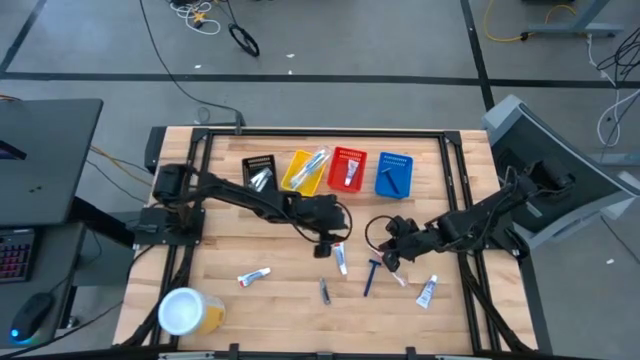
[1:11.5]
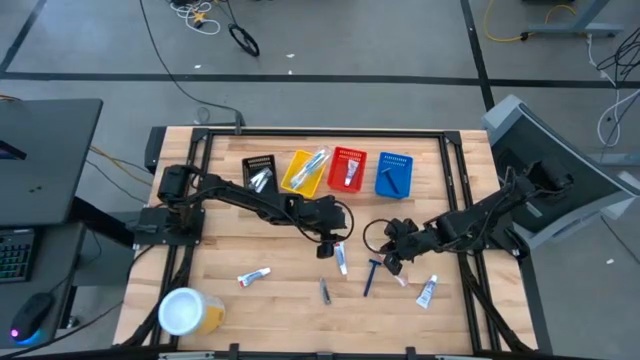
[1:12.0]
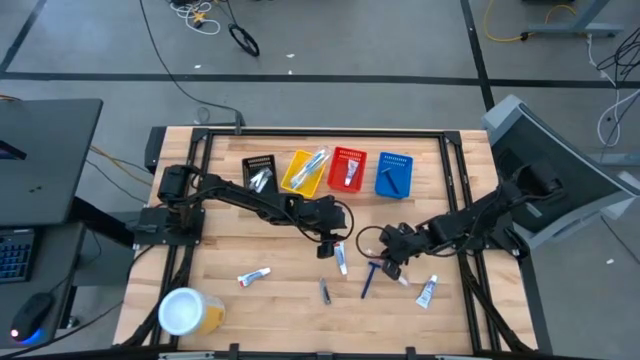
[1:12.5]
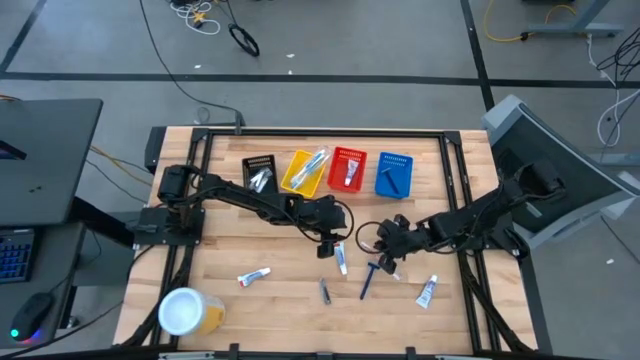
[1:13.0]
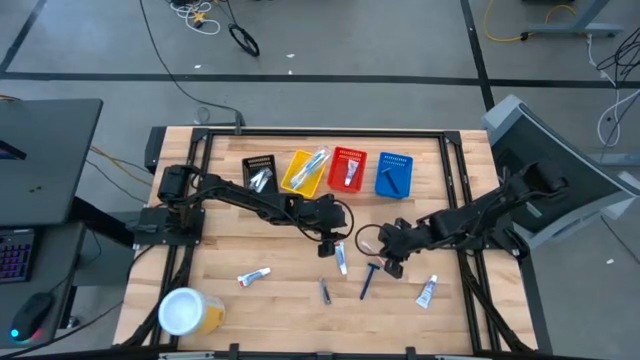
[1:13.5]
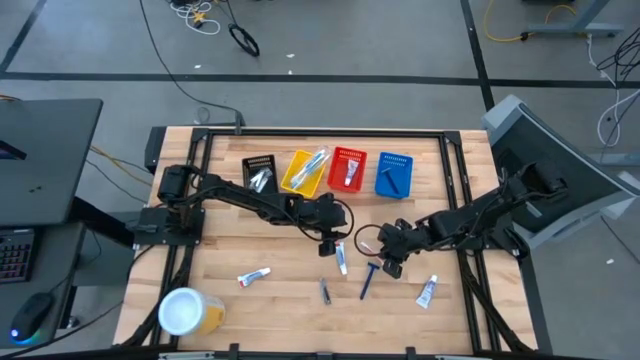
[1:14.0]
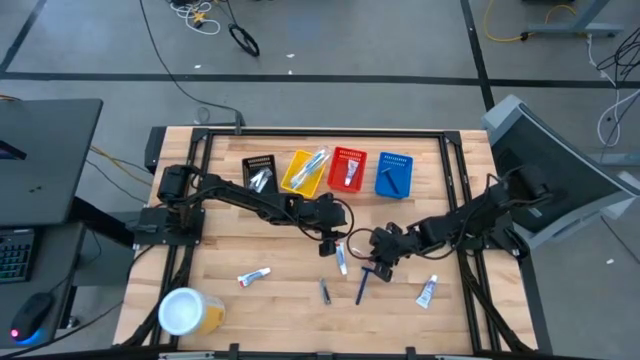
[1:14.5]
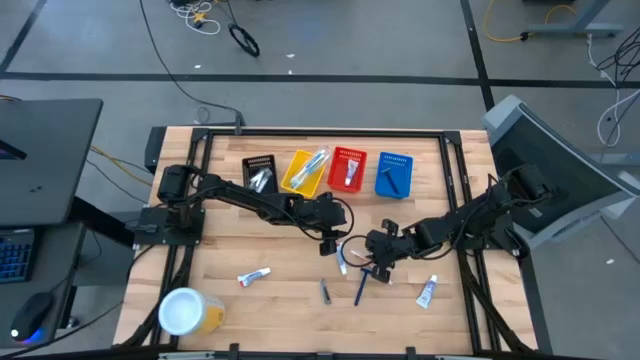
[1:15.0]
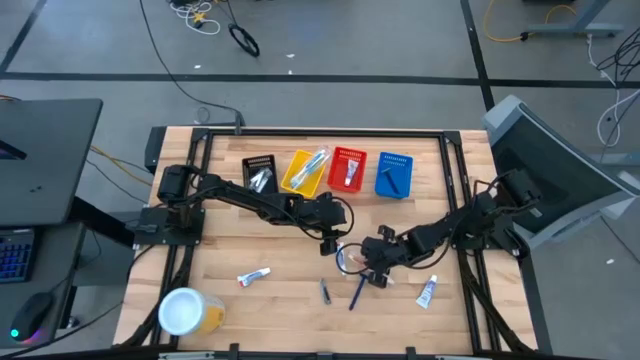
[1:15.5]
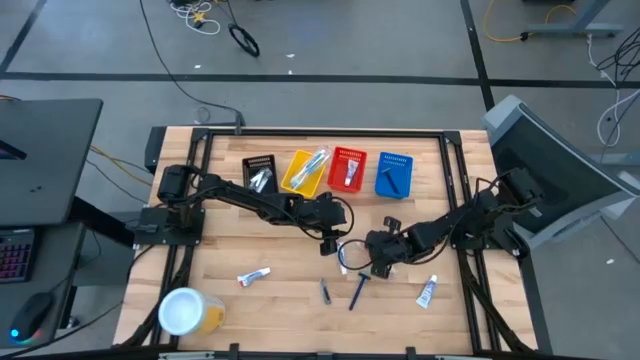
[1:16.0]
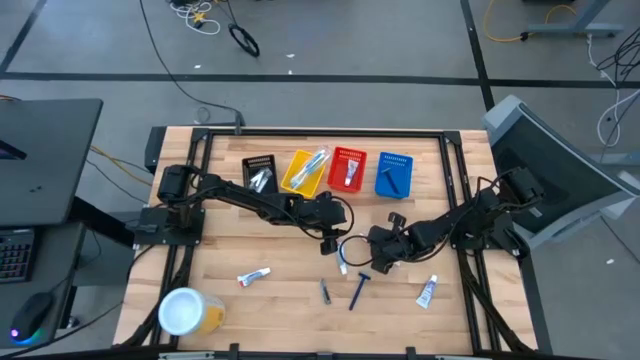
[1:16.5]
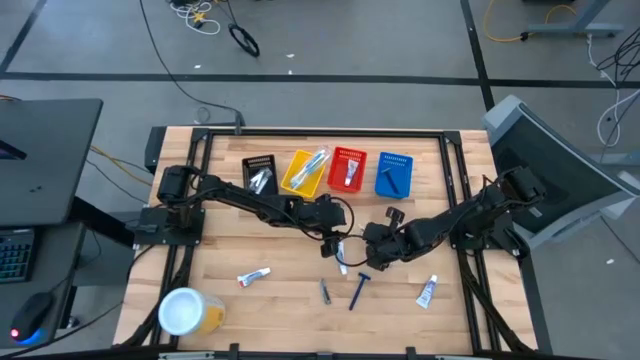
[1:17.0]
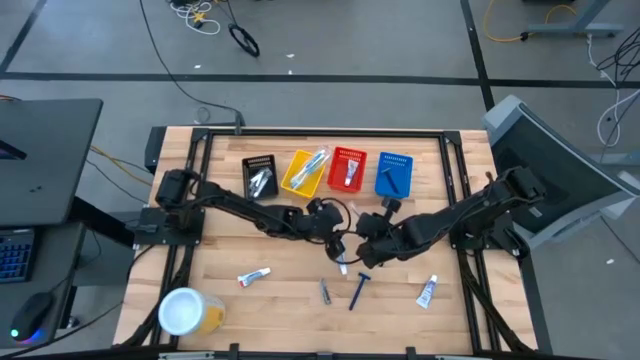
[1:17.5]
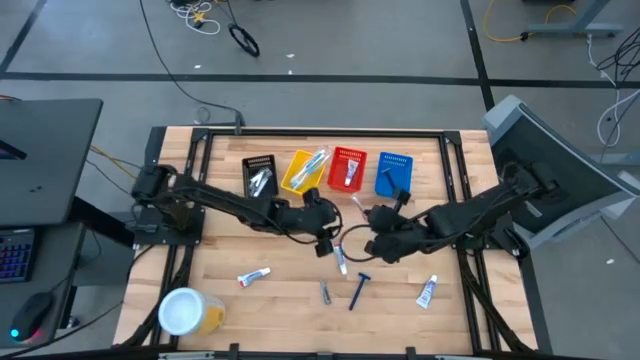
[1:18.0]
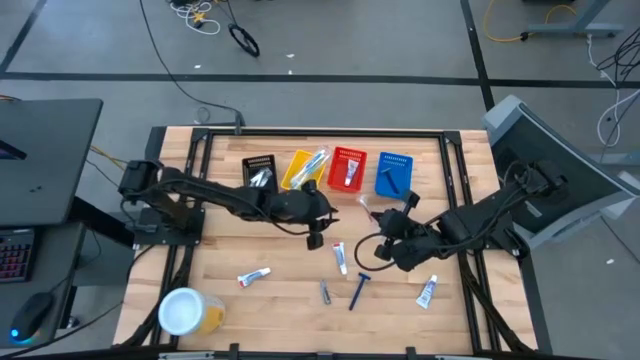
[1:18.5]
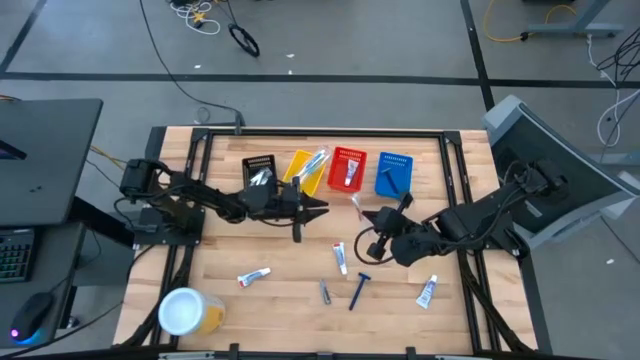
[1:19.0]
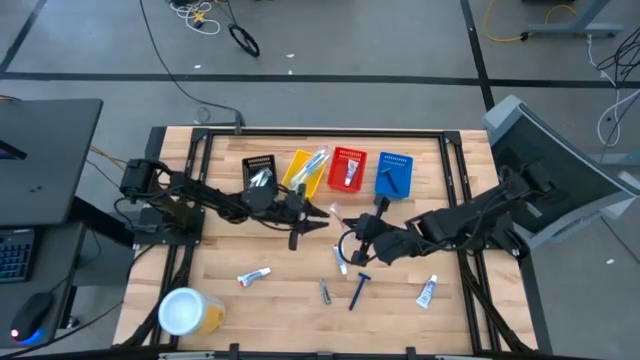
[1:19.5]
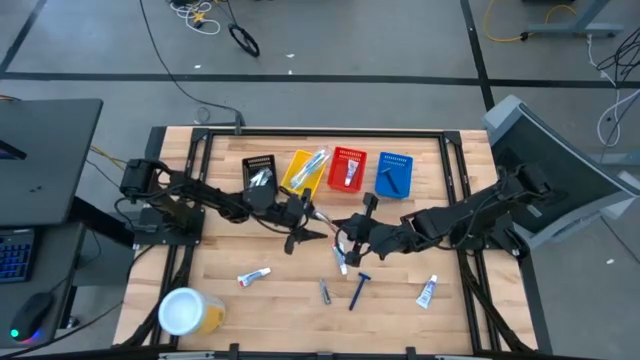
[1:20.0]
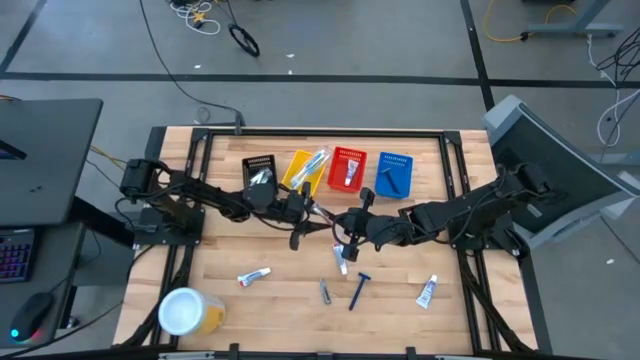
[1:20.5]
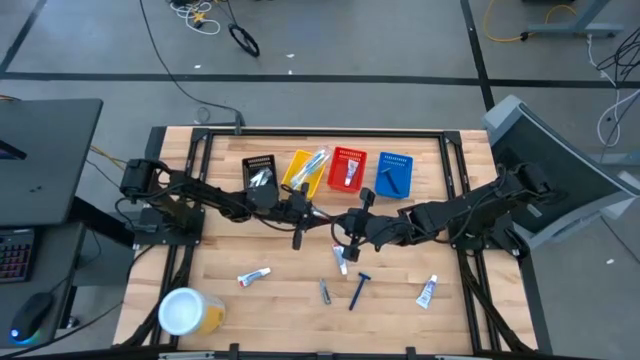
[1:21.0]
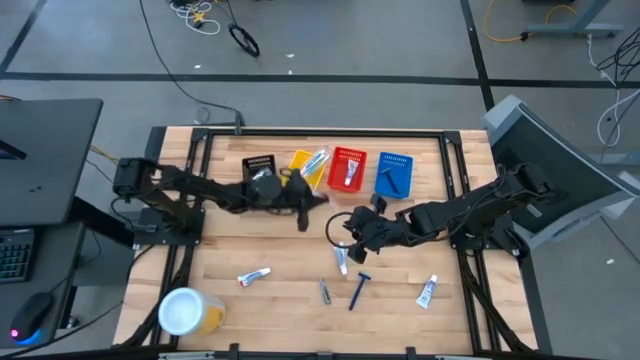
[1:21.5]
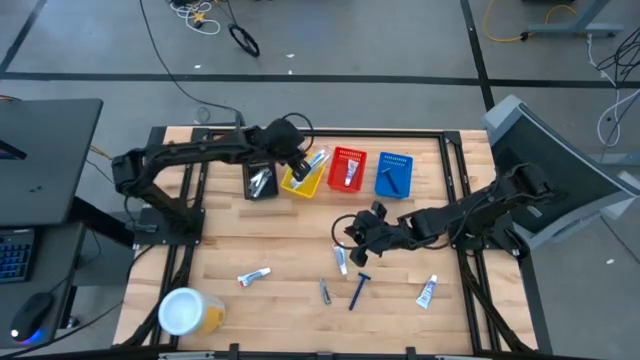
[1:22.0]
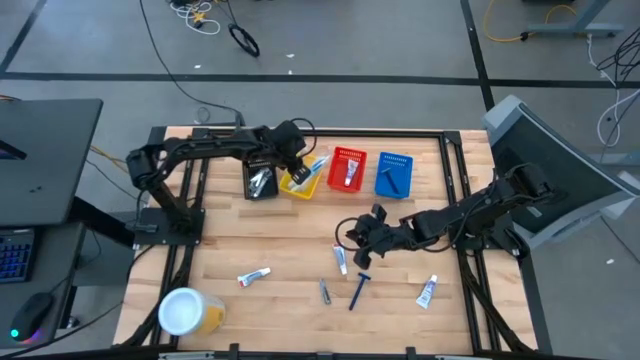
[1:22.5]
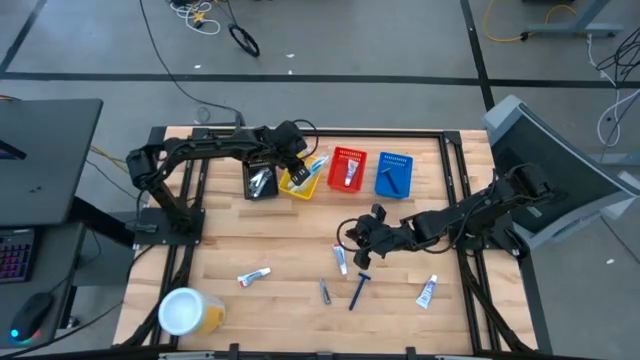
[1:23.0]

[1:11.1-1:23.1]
Task: Pick & Place Travel size toiletries
Put the orange toothbrush into the yellow bin

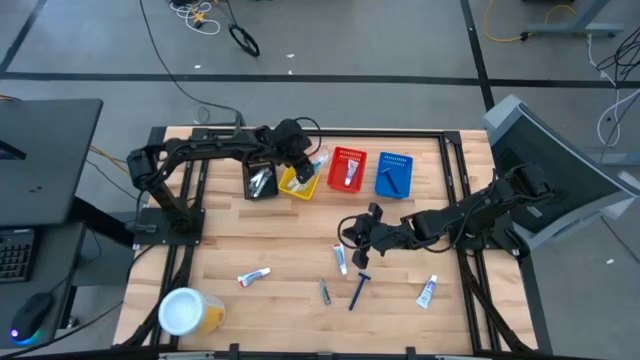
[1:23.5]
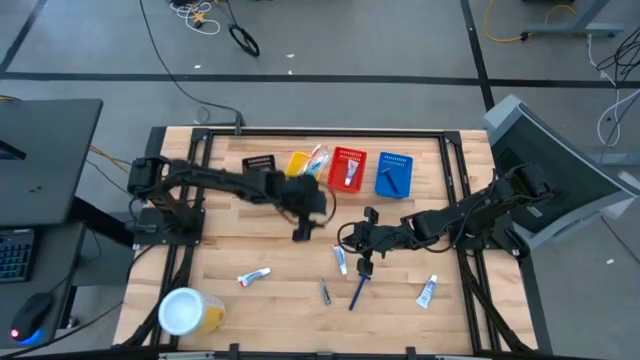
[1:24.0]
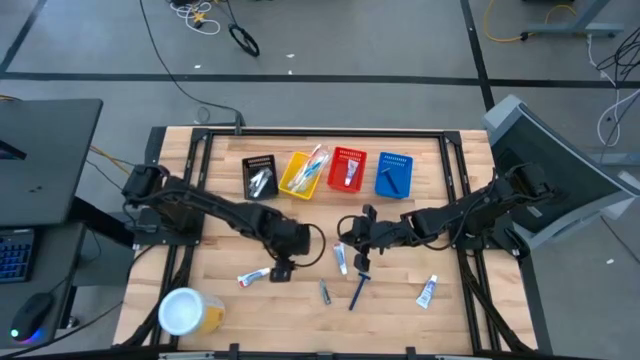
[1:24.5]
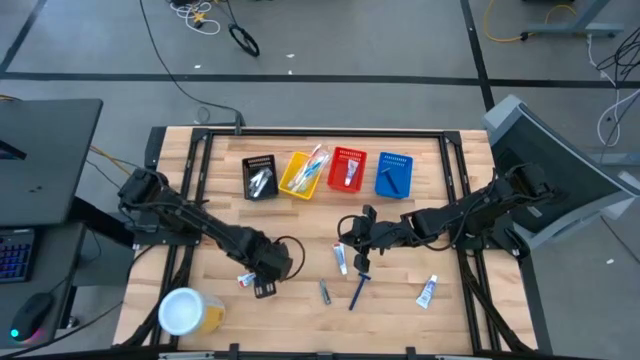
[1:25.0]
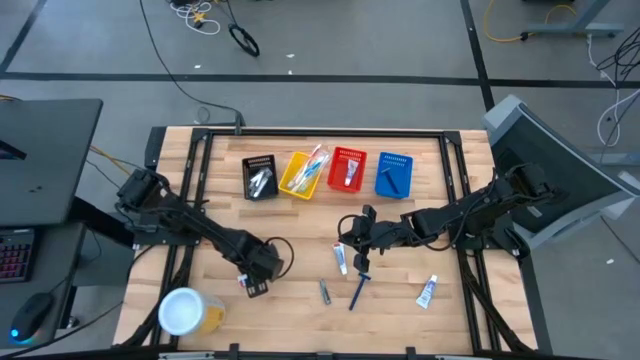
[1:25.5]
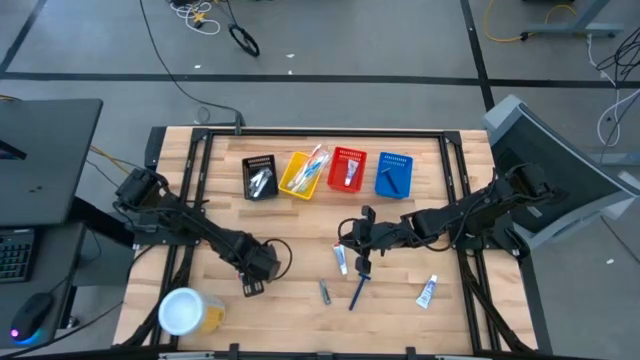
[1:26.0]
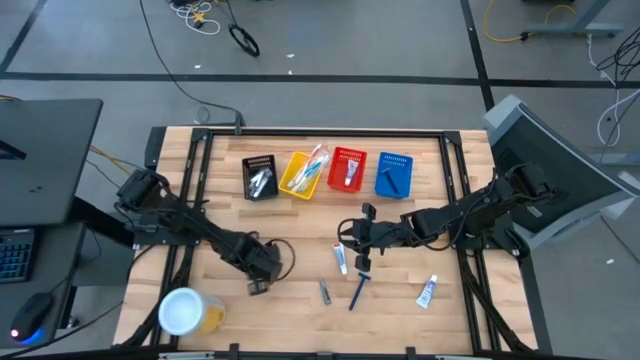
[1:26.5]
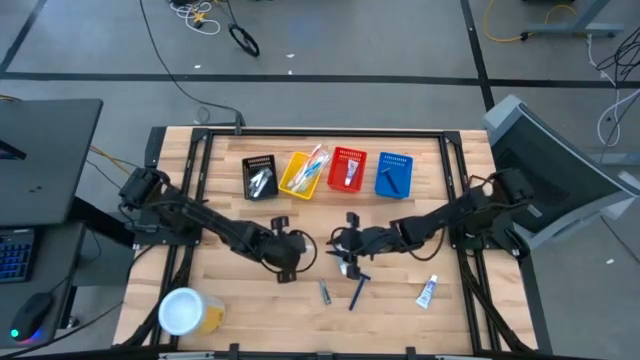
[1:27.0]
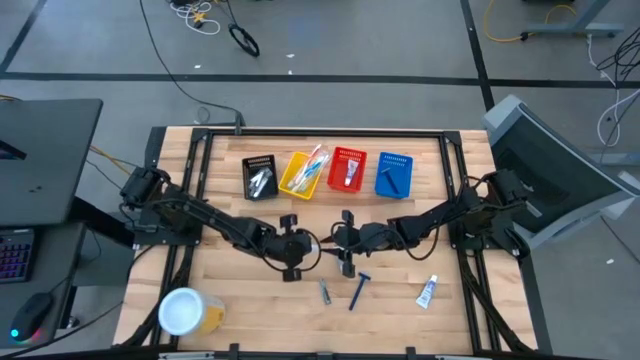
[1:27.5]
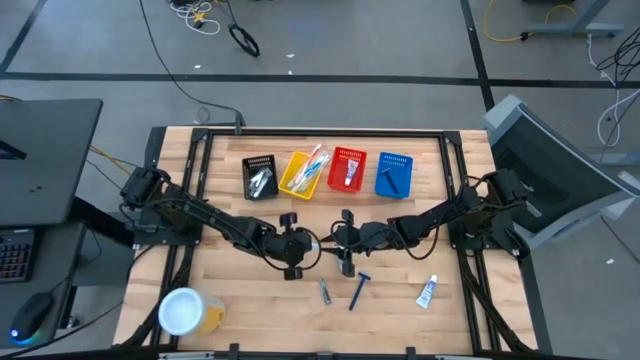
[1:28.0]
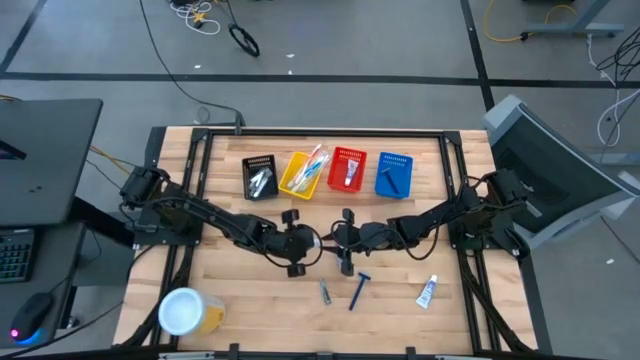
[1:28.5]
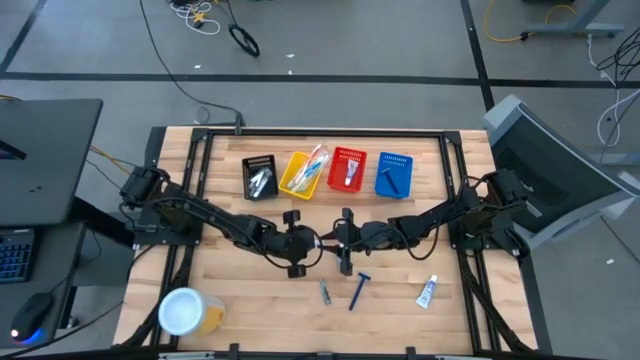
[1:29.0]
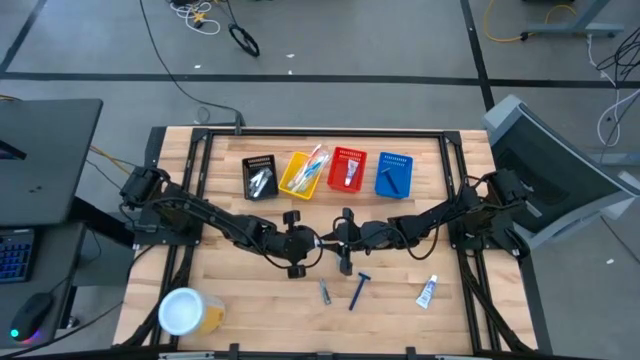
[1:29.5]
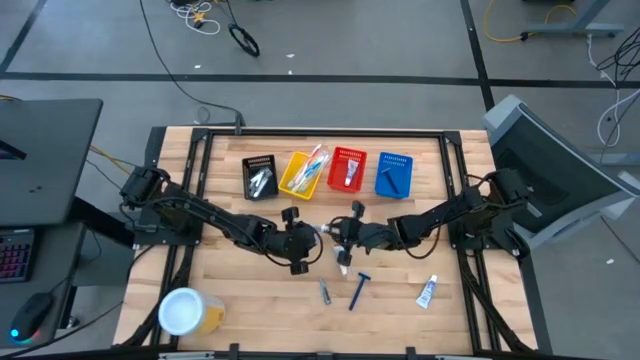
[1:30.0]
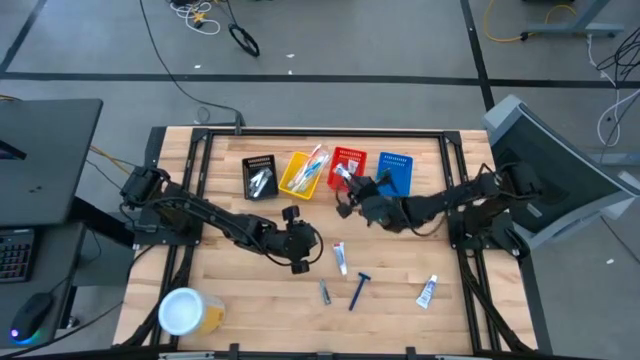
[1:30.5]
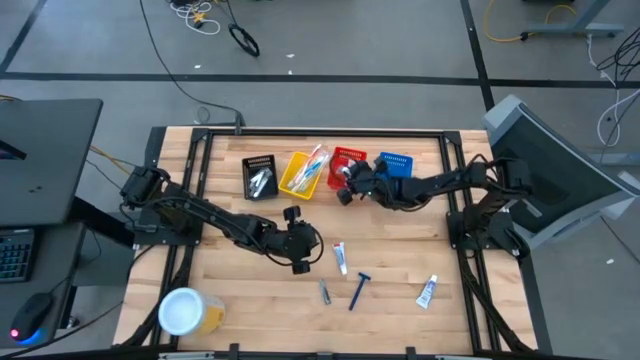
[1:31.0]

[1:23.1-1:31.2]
Put the white toothpaste into the red bin
